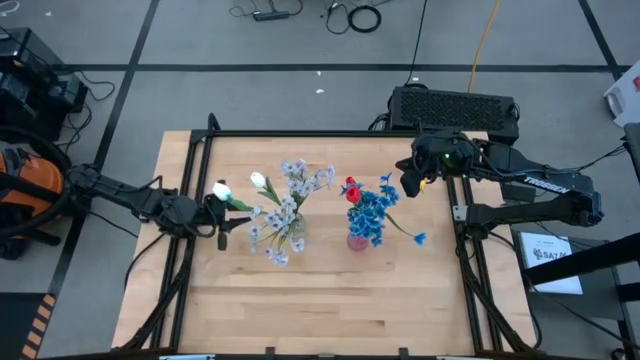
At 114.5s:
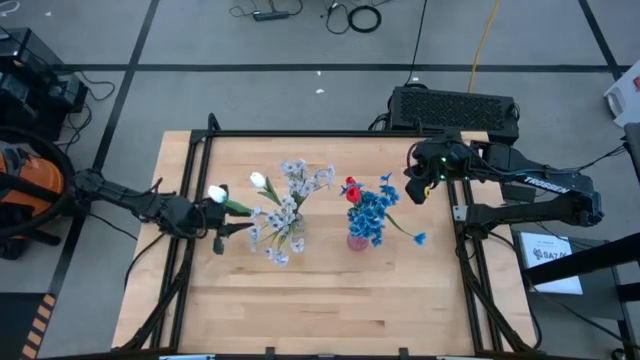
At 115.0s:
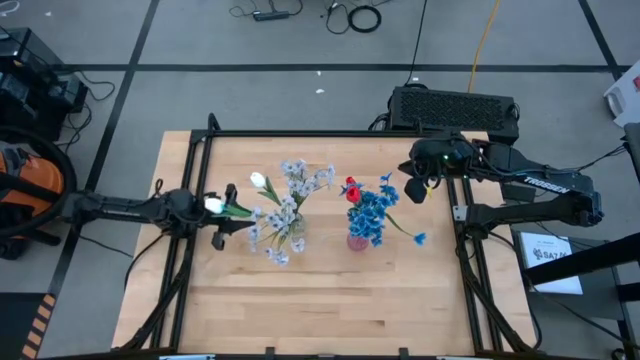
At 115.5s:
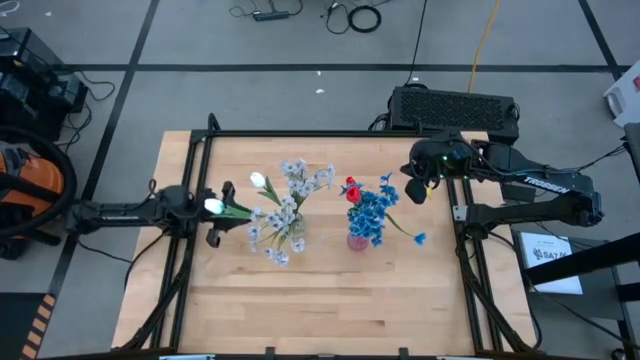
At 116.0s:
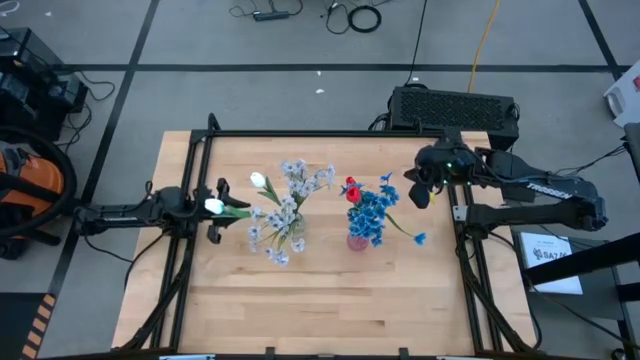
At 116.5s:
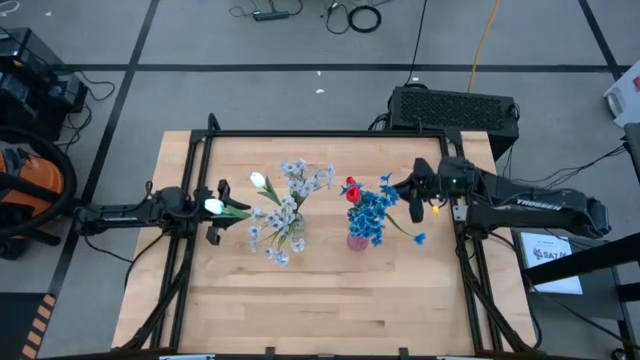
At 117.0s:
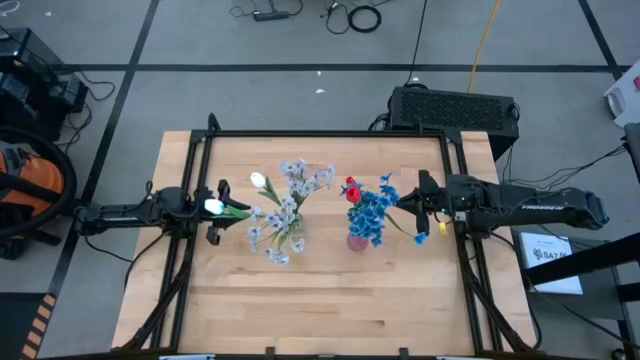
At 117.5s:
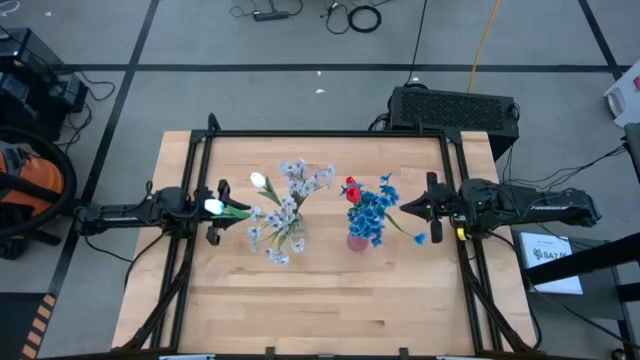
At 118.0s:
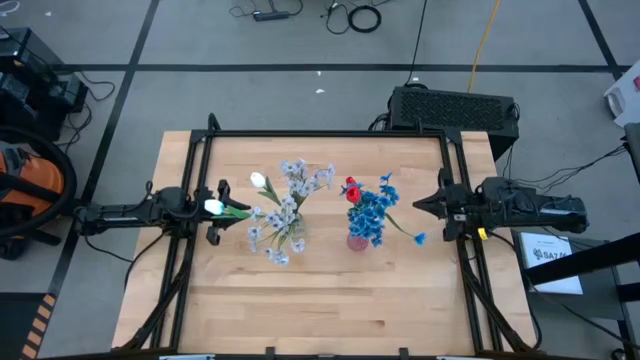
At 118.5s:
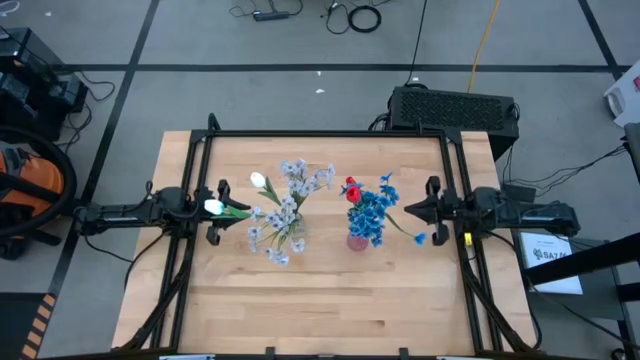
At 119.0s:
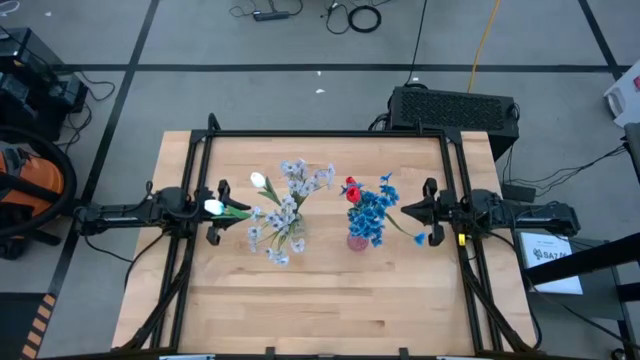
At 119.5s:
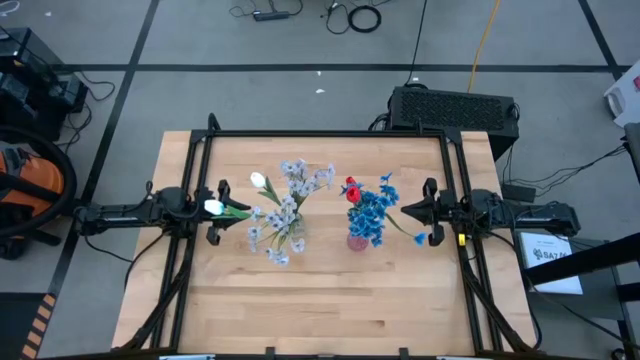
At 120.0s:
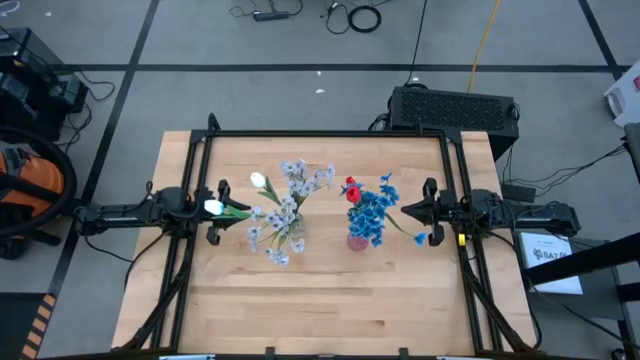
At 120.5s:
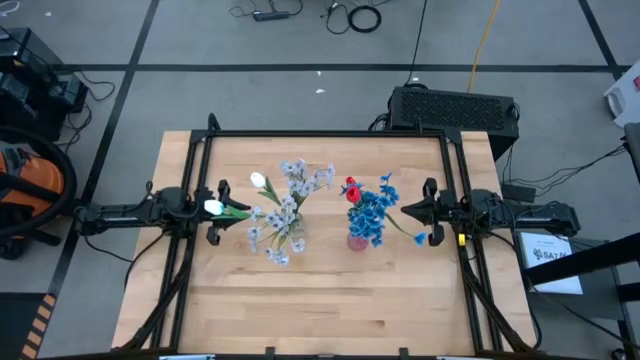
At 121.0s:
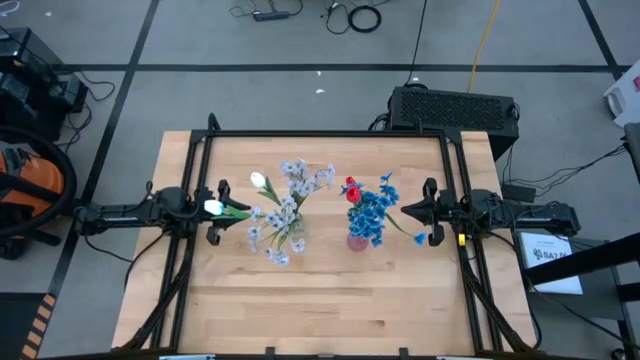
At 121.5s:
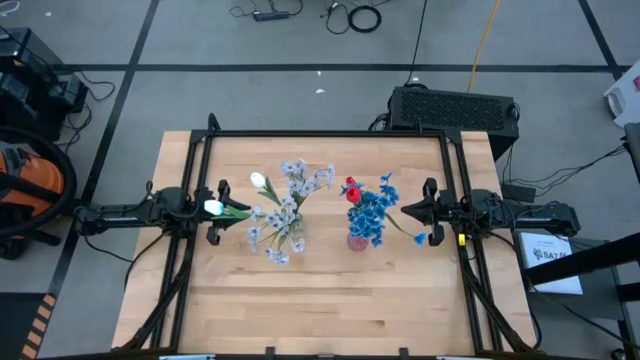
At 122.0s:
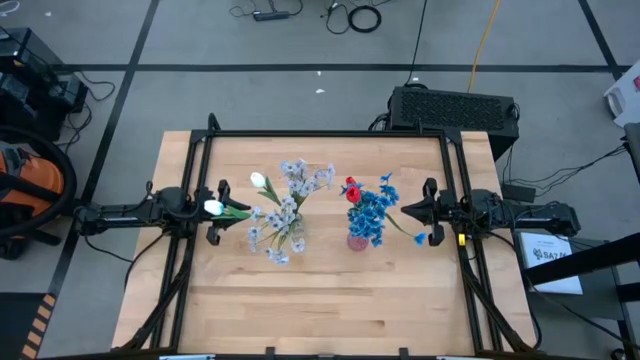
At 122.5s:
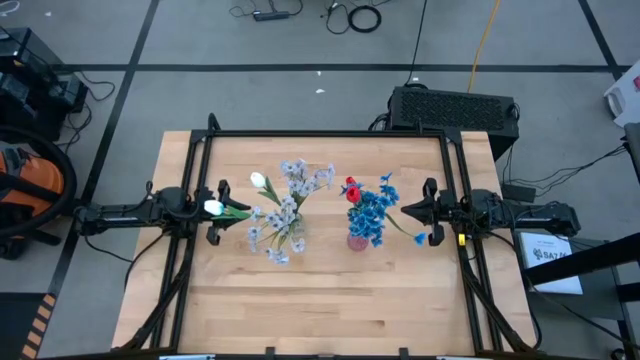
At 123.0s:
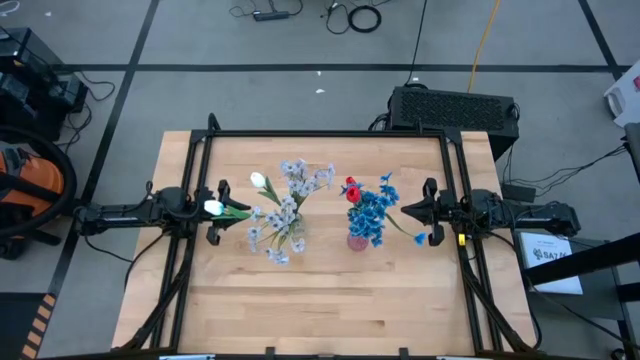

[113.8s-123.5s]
Task: Sort flowers into vase by color
Return to Home Position

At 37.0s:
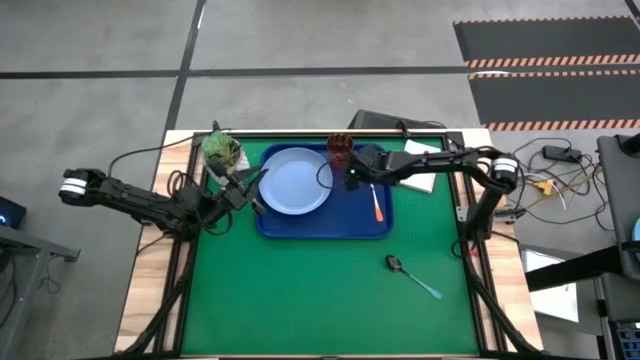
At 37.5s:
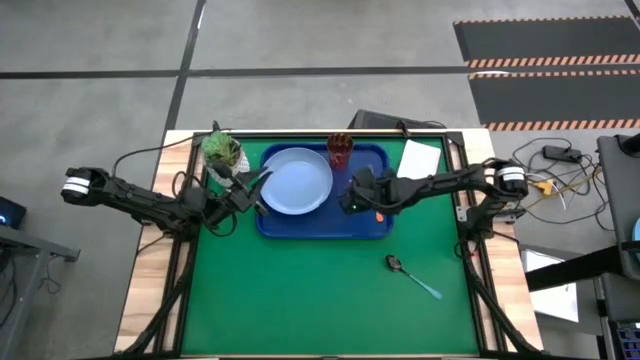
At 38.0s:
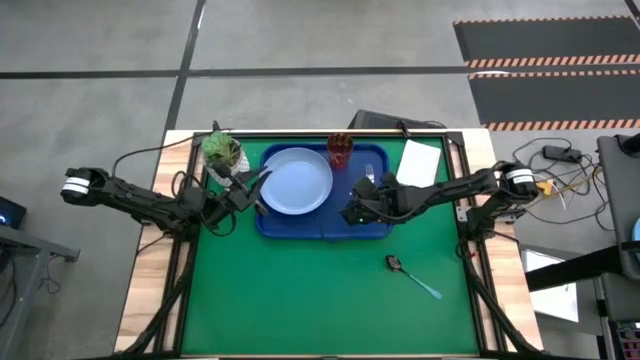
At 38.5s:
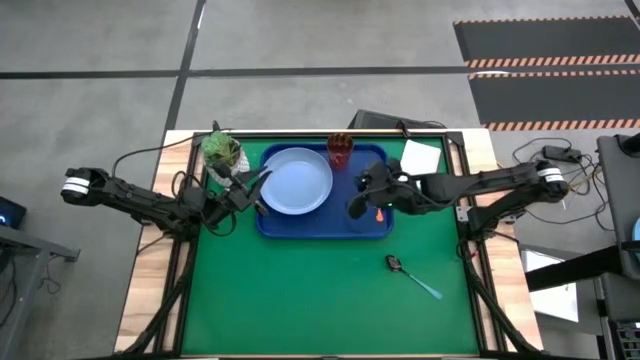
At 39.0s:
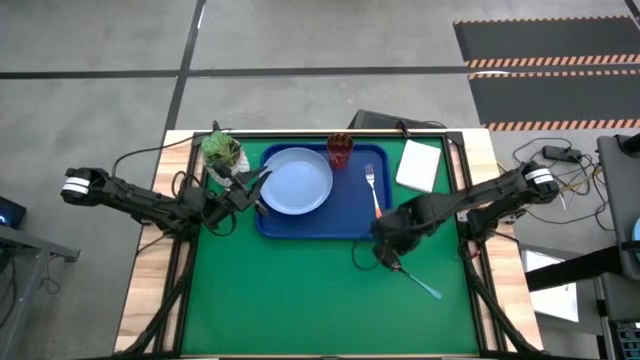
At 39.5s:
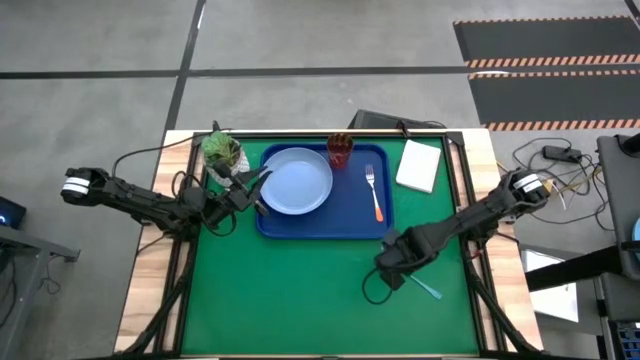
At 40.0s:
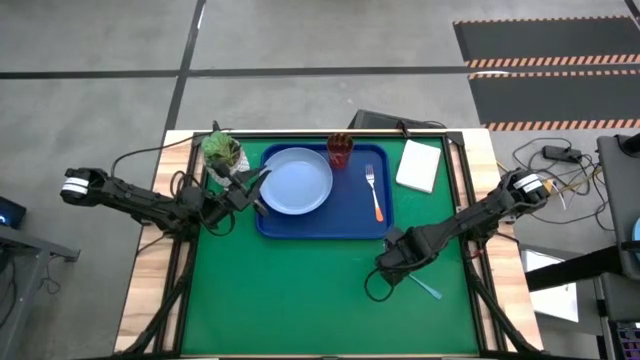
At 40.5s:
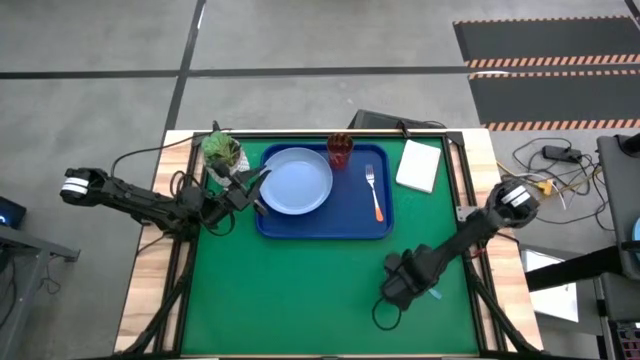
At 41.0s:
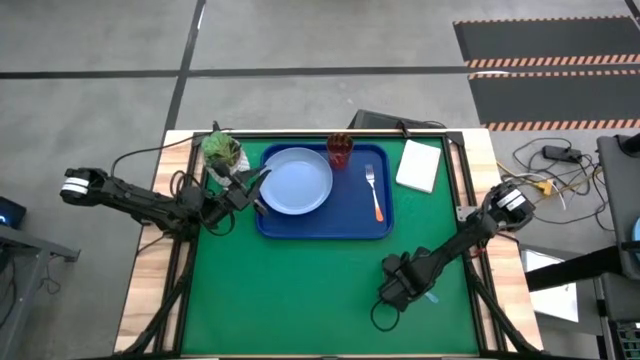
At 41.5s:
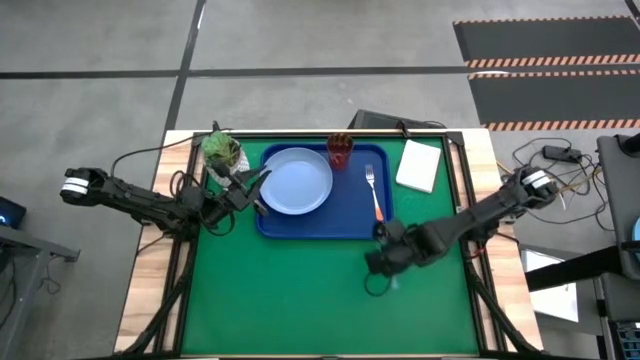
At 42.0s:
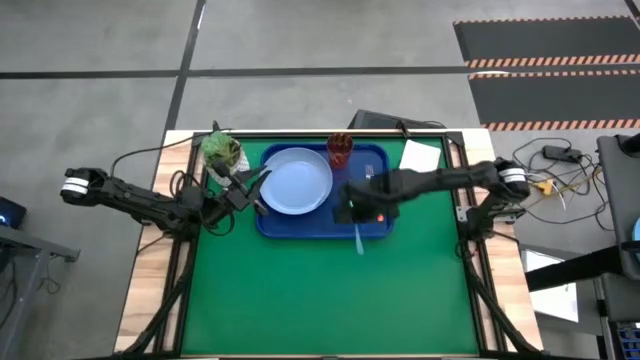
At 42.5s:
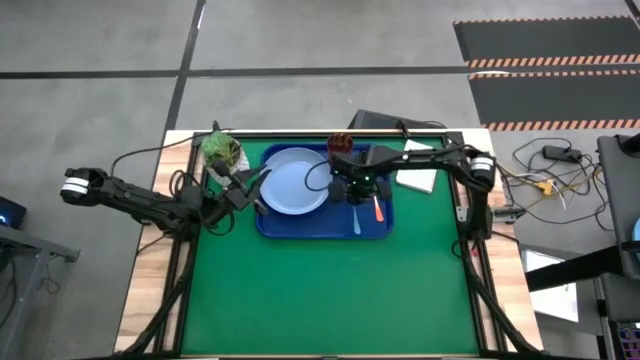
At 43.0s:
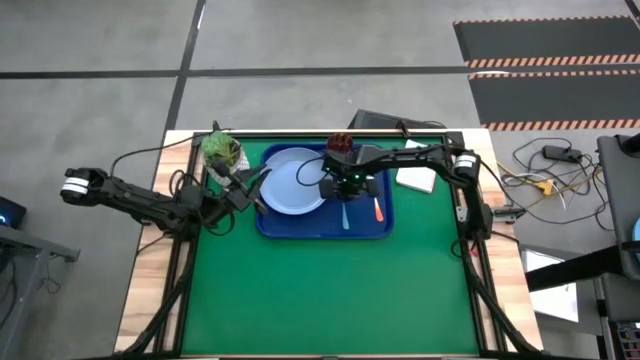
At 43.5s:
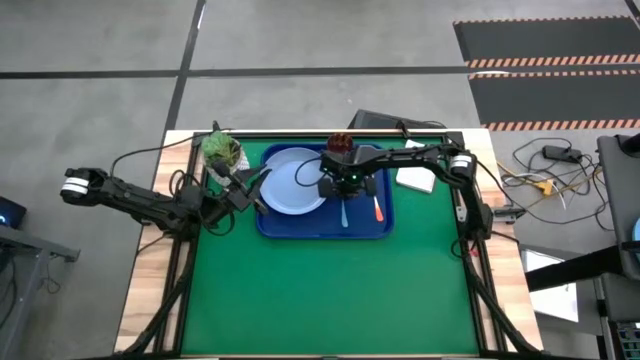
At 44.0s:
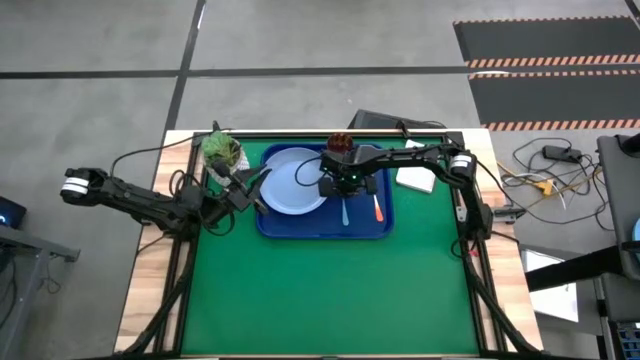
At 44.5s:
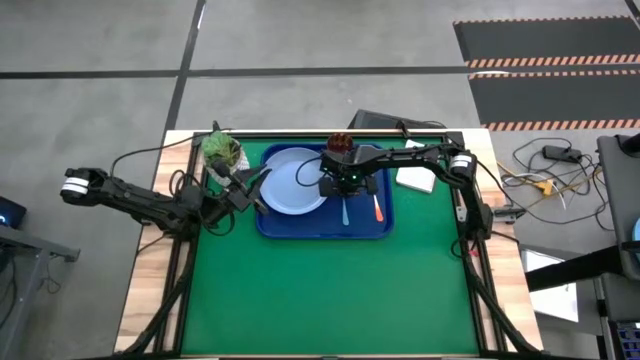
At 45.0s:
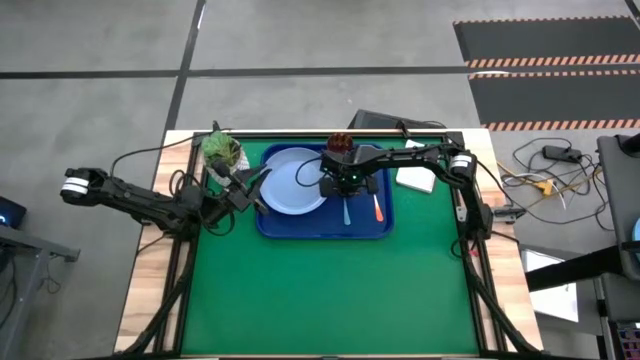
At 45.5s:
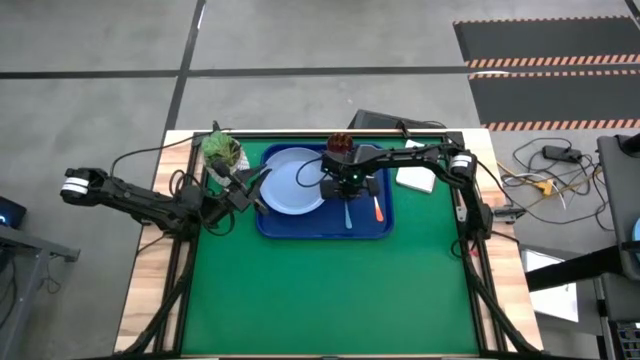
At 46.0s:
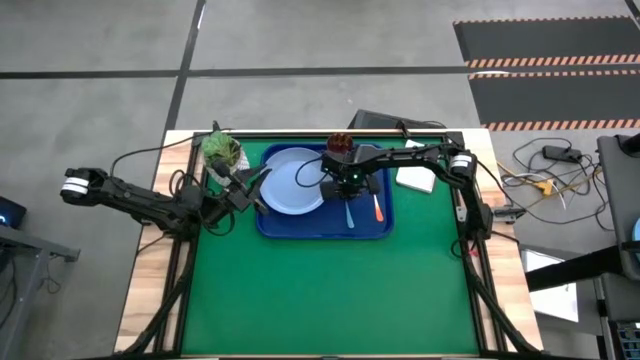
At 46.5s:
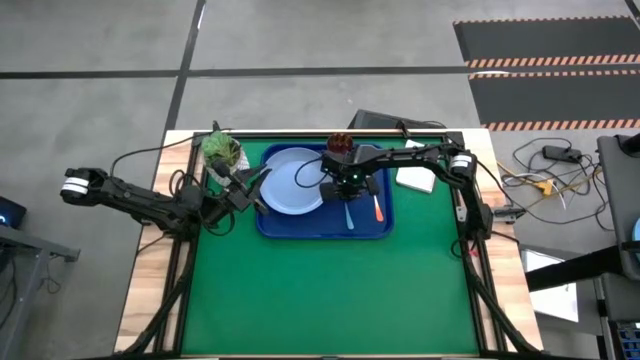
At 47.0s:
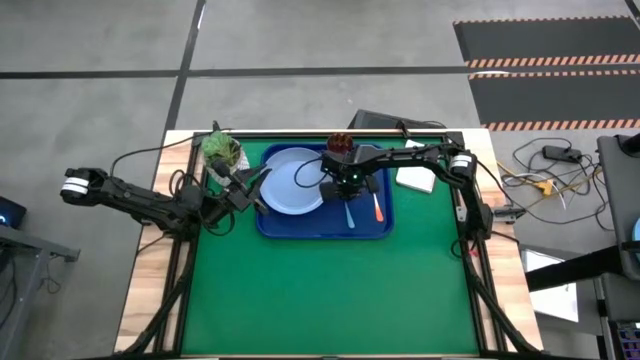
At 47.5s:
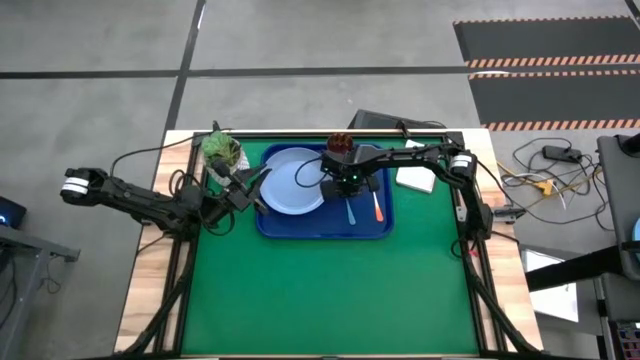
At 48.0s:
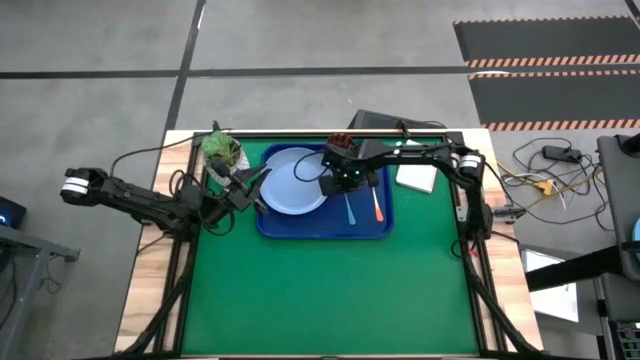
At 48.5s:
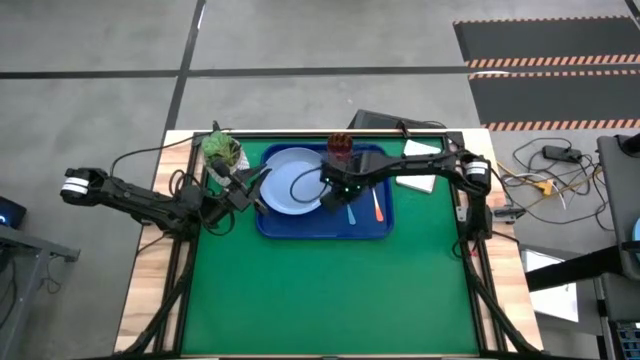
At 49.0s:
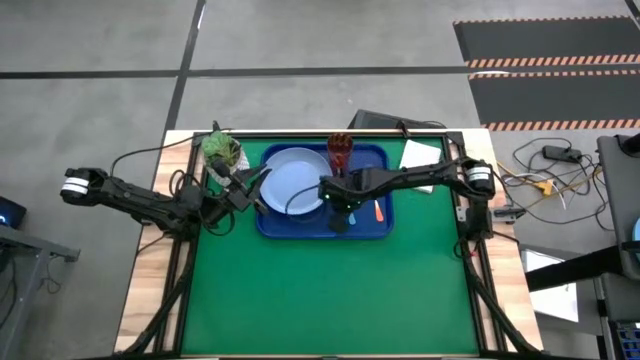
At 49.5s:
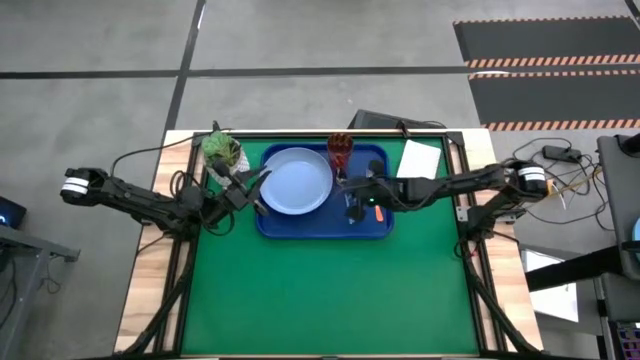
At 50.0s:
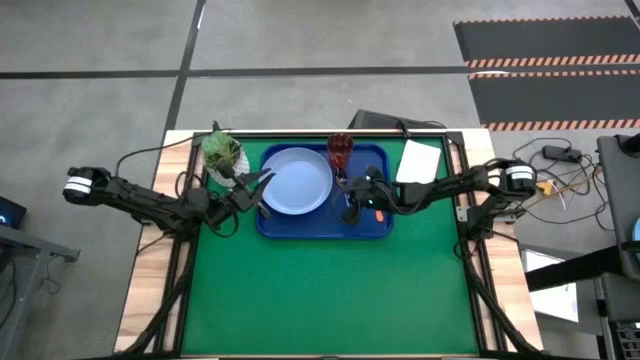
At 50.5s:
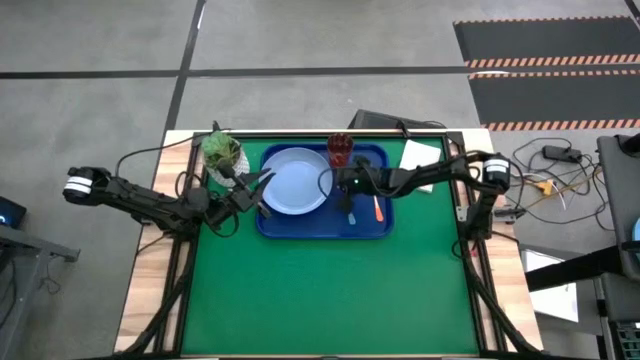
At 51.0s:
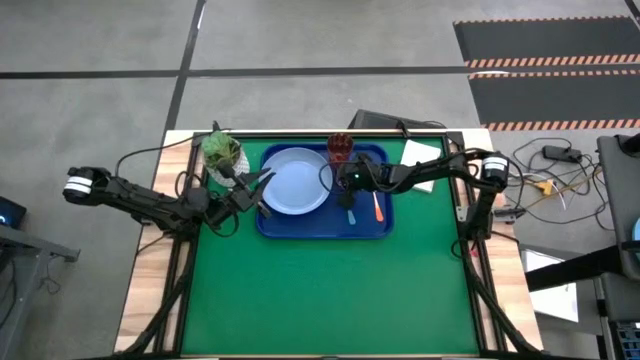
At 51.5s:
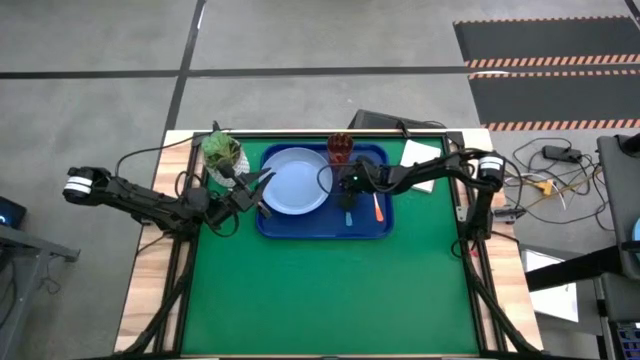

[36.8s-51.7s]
Task: Pick and place plate/cup/fork/spoon on tray
Put the black spoon on the blue tray to the left of the orange fork
